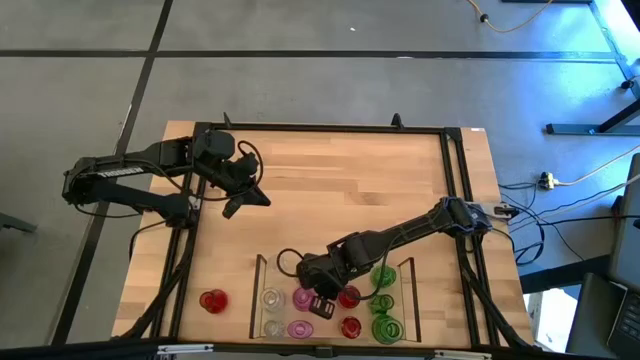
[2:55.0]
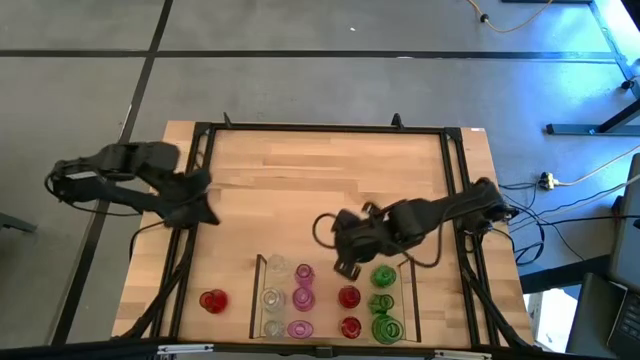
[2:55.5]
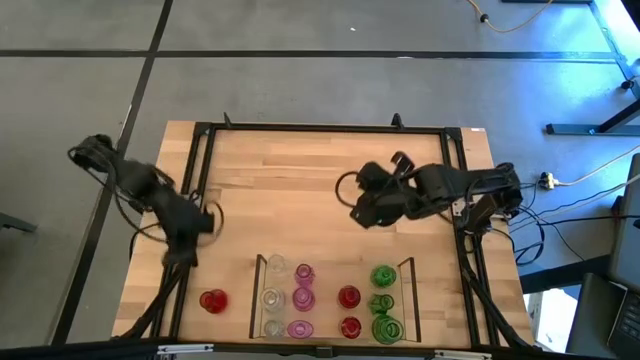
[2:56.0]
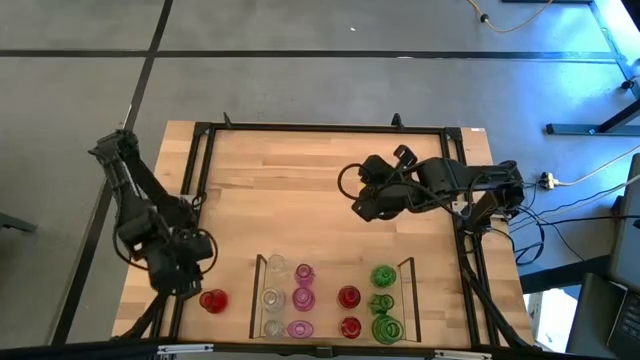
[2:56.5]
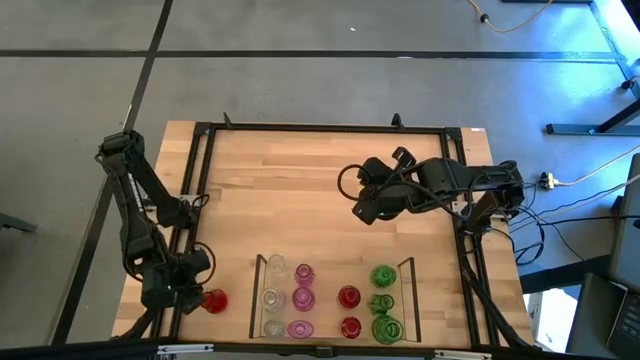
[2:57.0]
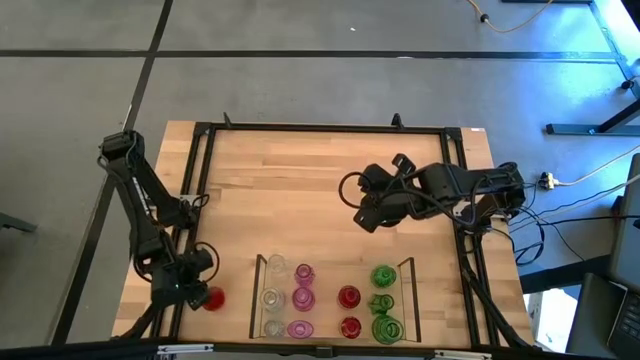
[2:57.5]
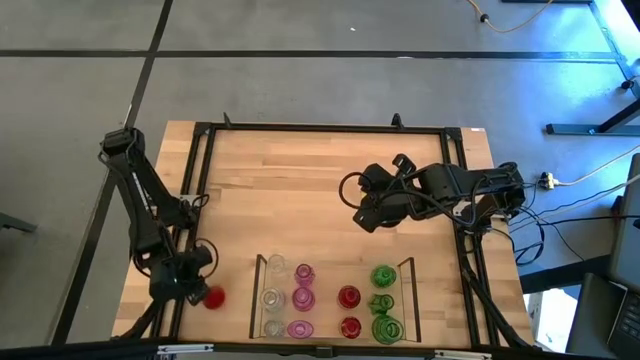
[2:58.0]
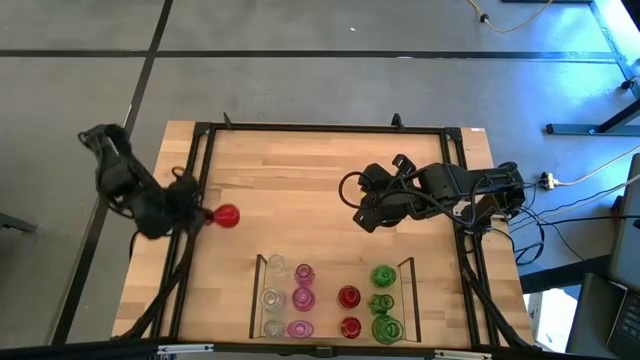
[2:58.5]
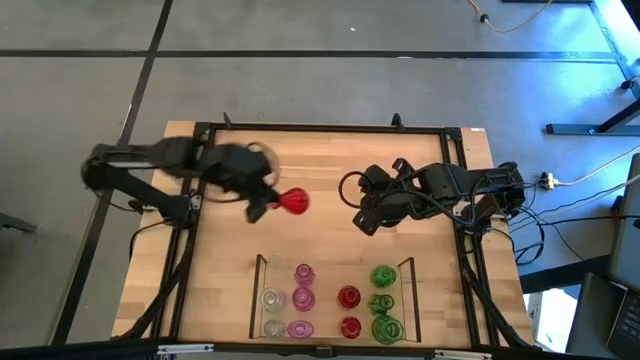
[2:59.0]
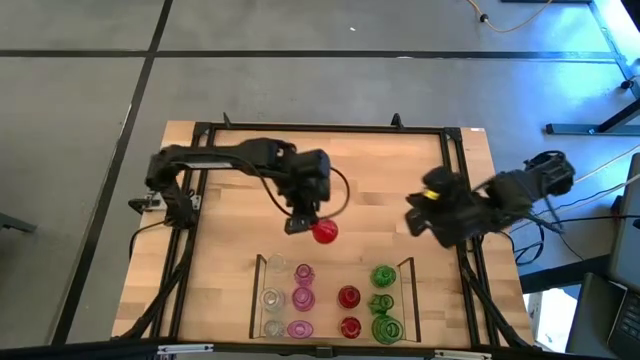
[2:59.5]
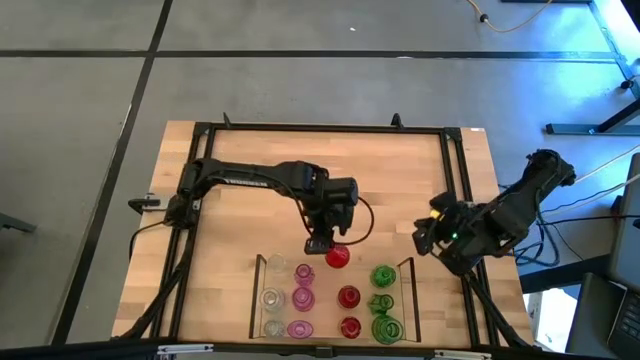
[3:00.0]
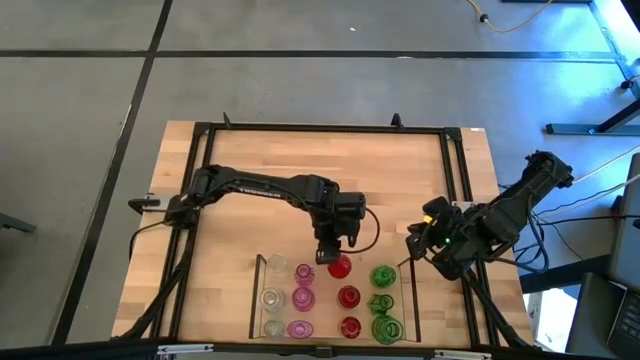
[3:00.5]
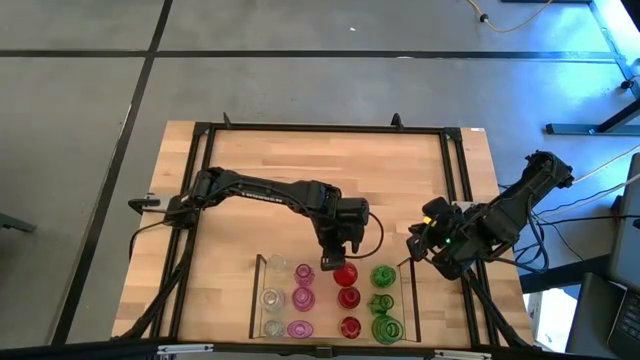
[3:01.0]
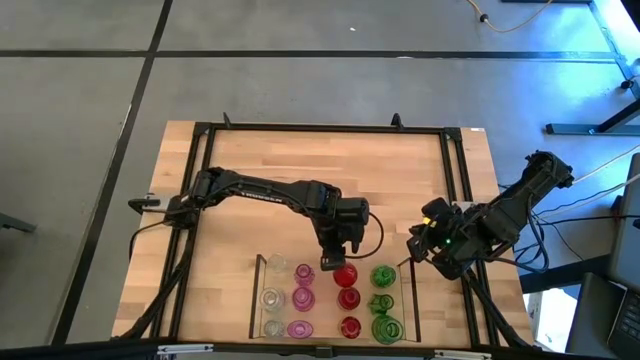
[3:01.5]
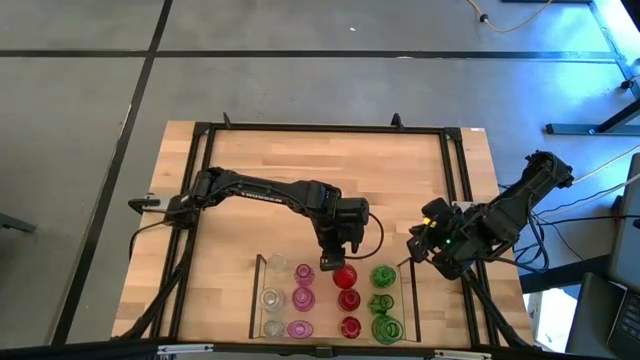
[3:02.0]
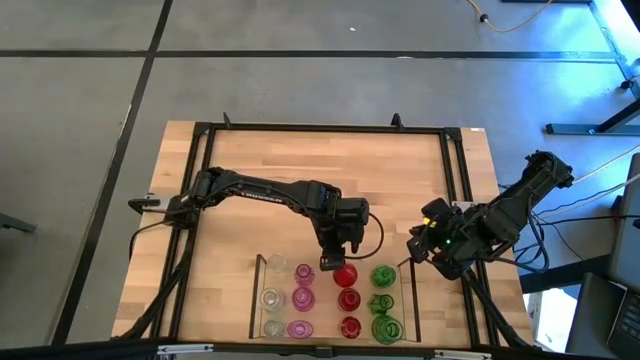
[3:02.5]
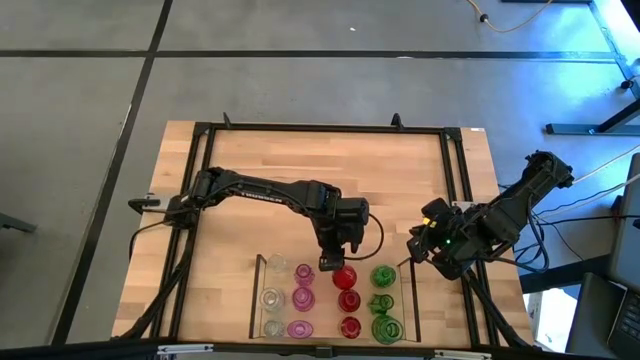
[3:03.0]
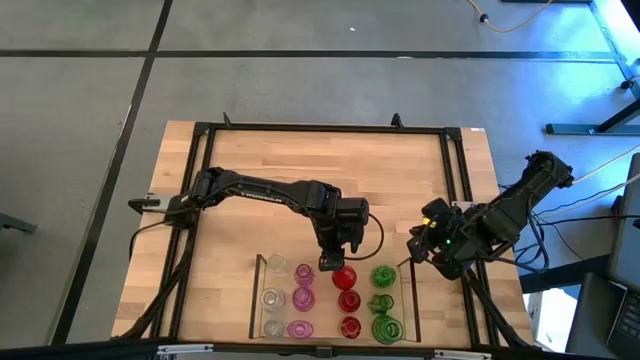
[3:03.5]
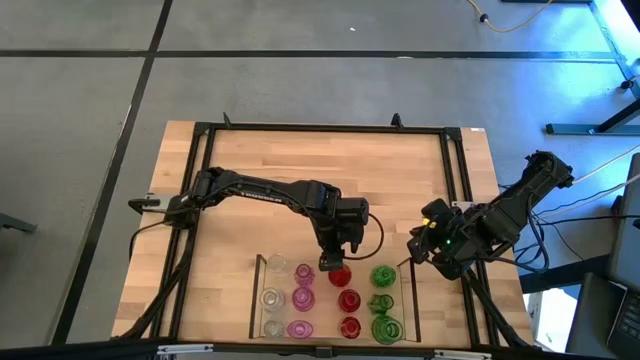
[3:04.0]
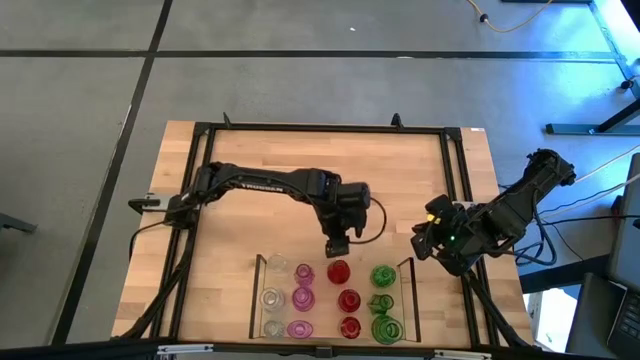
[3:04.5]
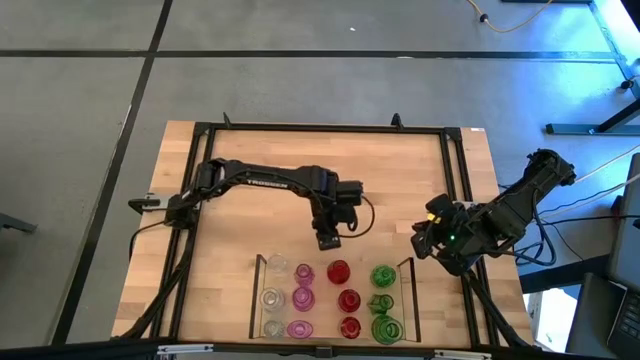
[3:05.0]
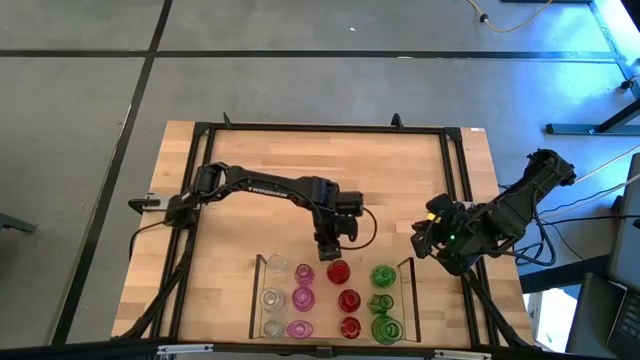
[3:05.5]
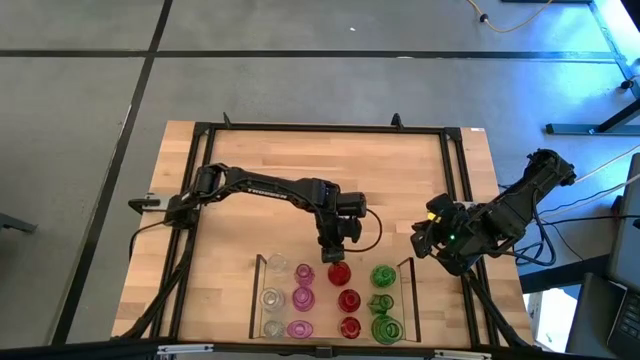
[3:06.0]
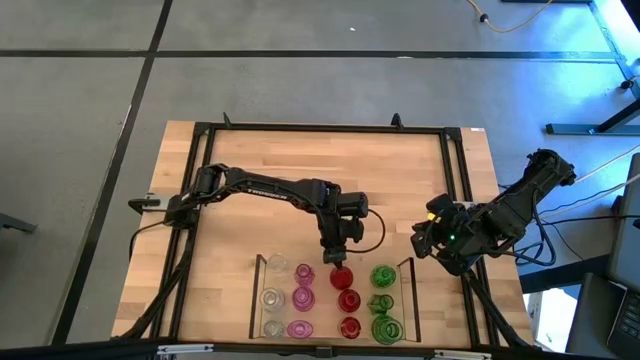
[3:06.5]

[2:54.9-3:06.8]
Task: sort vases onto shelf
Put the red vase aligned with the other red vases on the shelf

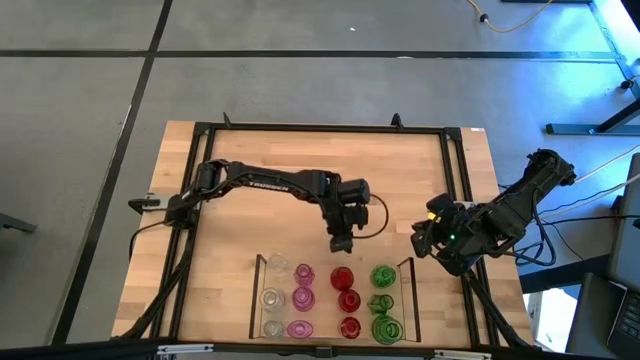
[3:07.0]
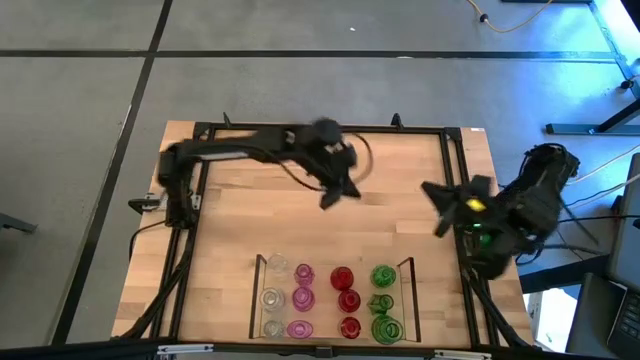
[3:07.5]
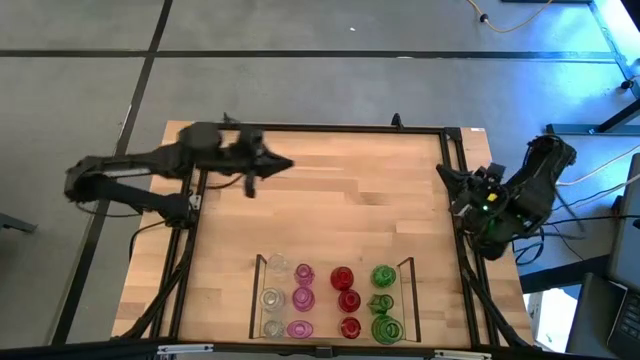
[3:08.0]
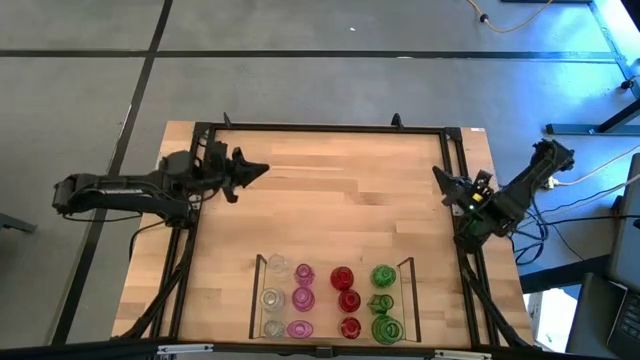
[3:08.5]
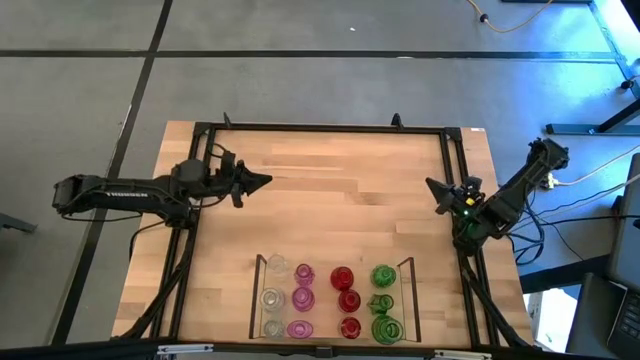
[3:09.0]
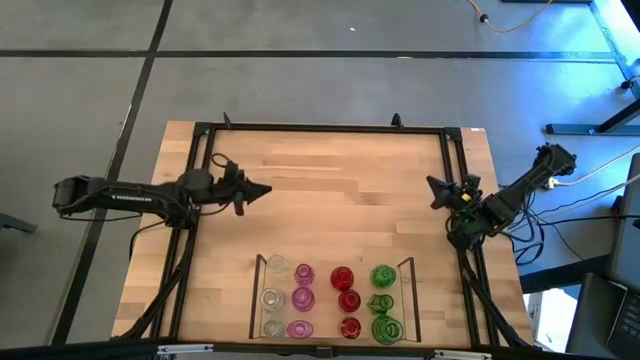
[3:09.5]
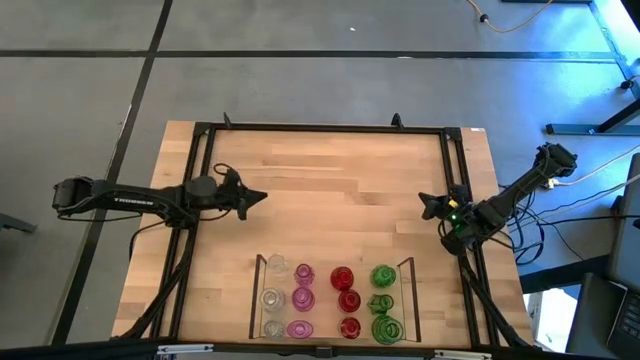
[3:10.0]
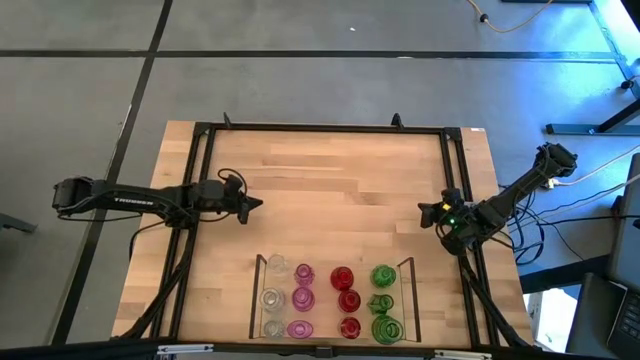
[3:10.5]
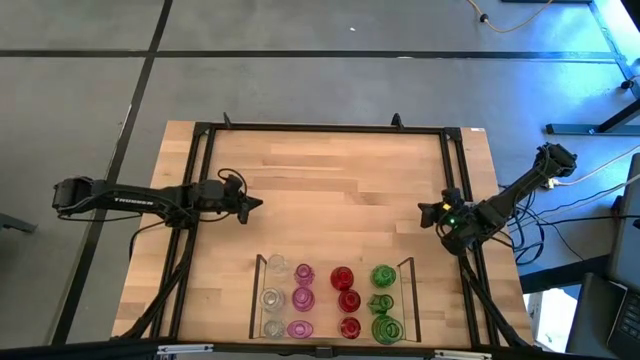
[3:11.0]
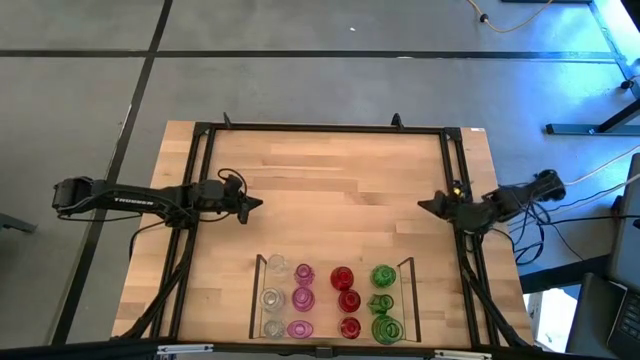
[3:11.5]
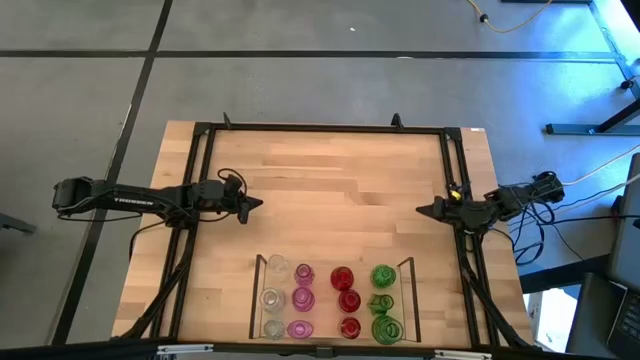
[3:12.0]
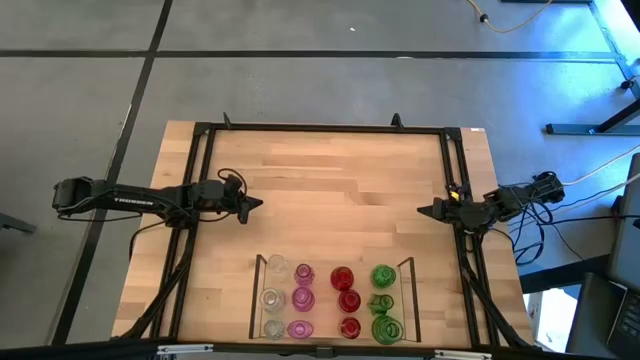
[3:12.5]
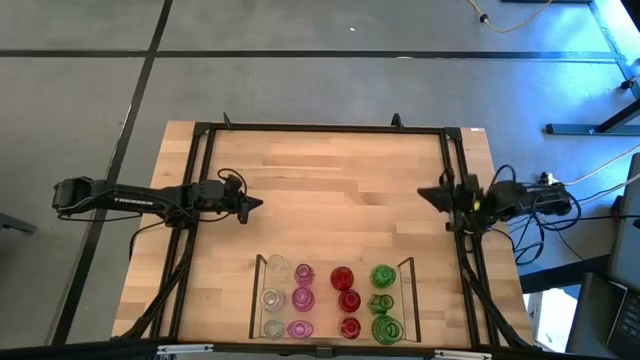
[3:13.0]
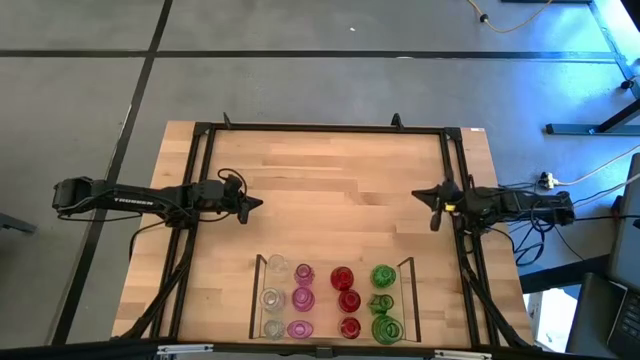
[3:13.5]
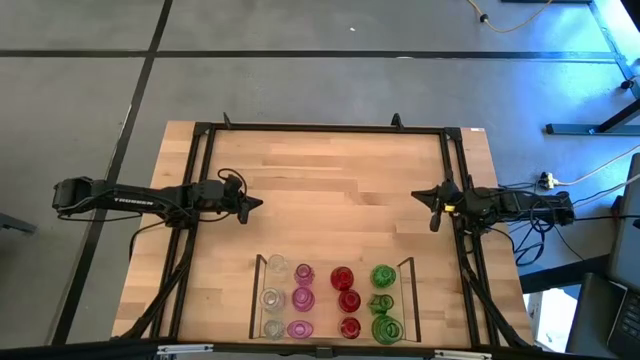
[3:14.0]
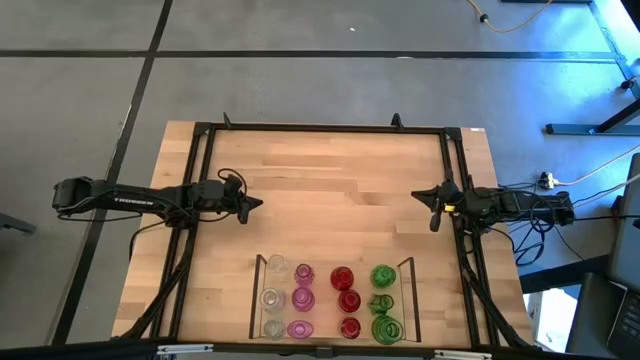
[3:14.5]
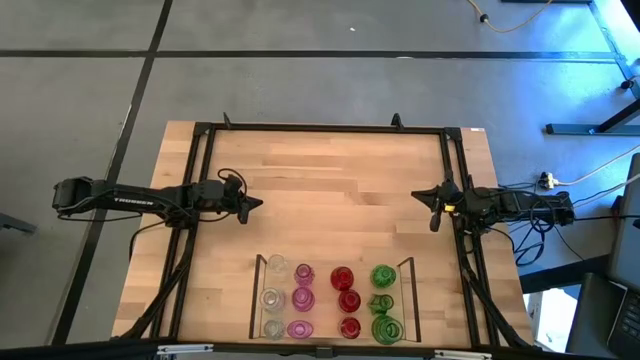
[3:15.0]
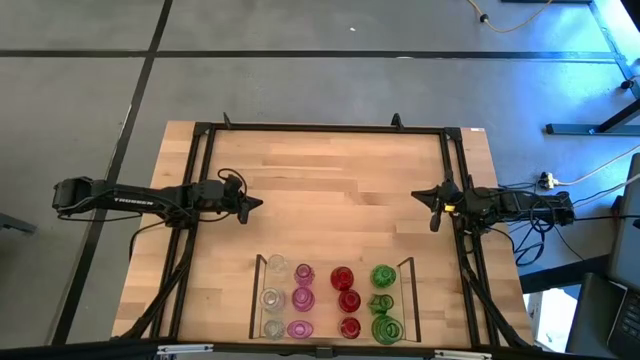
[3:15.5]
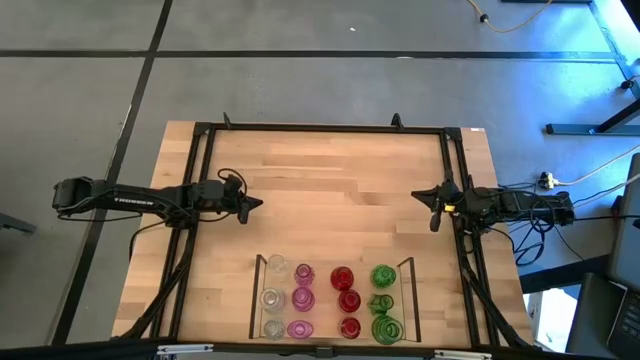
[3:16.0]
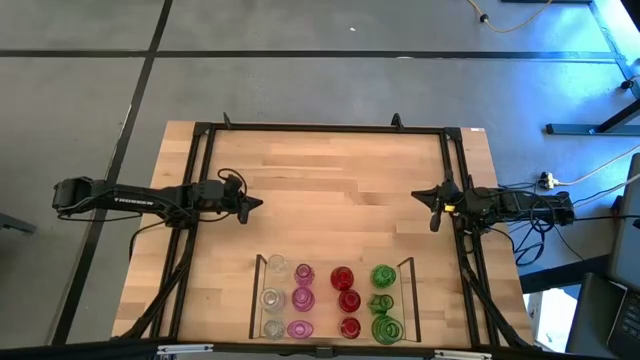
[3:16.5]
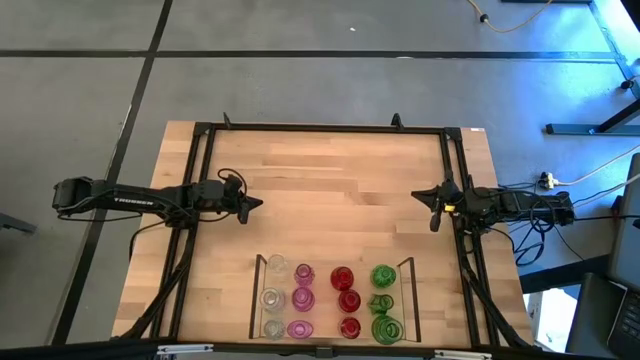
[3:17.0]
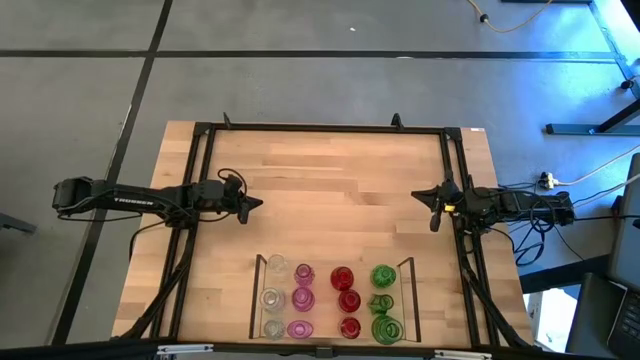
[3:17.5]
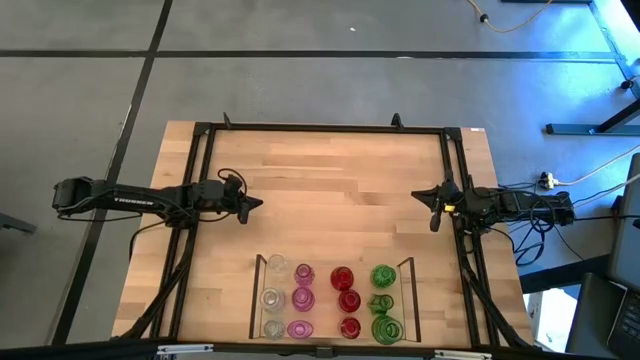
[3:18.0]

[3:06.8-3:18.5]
Return to Home Position
